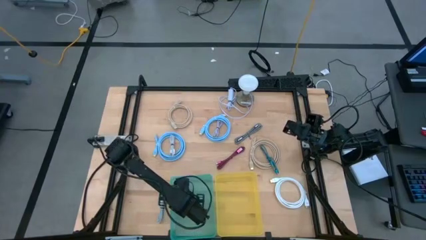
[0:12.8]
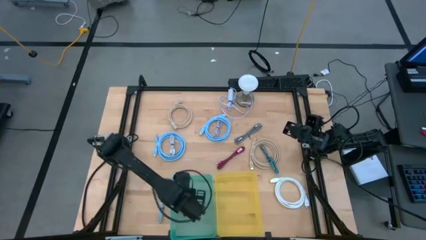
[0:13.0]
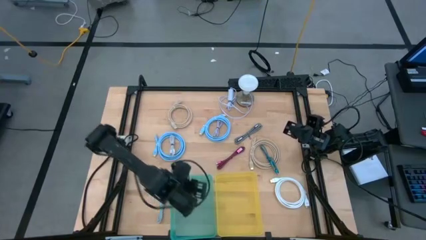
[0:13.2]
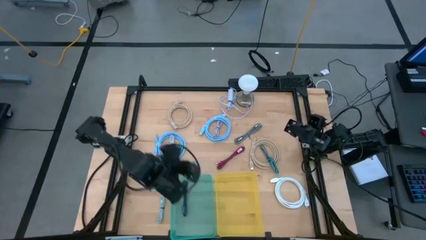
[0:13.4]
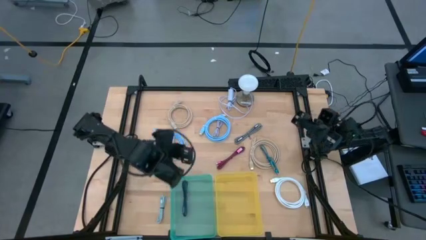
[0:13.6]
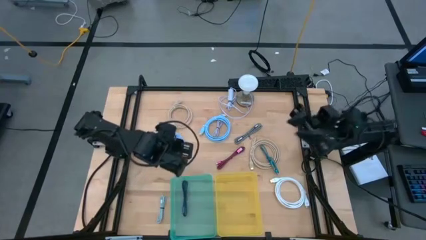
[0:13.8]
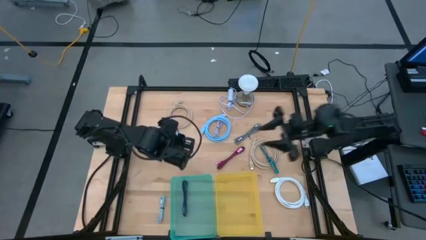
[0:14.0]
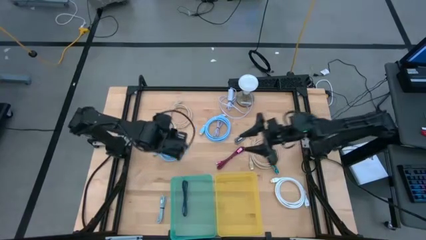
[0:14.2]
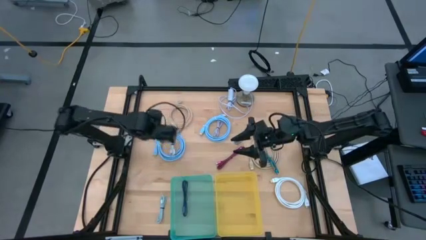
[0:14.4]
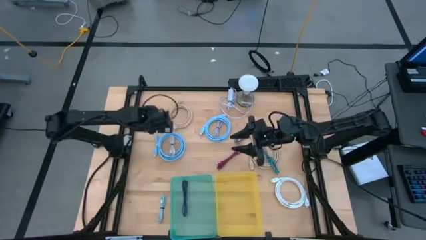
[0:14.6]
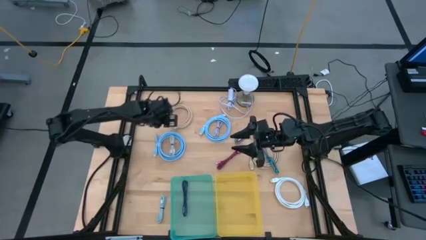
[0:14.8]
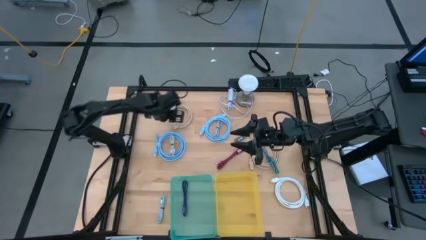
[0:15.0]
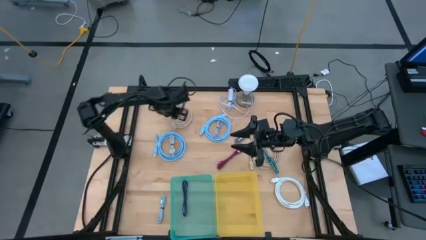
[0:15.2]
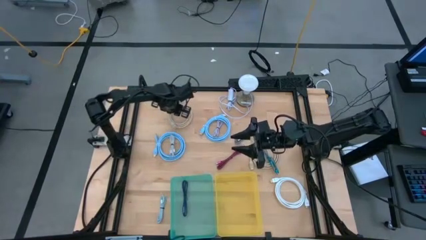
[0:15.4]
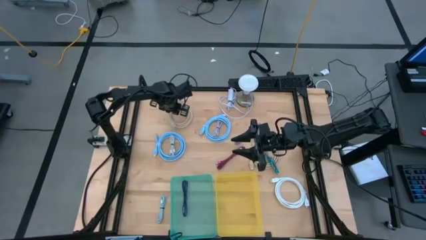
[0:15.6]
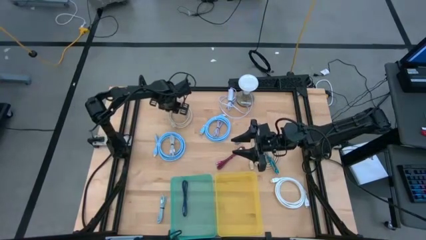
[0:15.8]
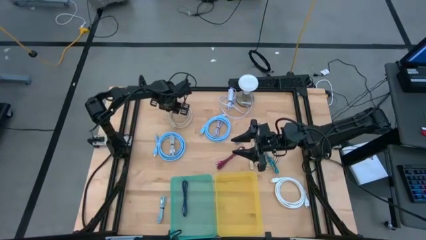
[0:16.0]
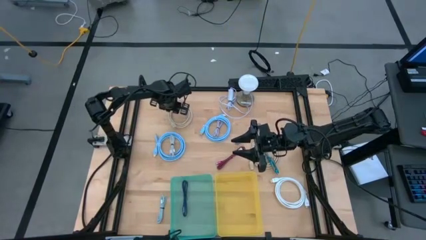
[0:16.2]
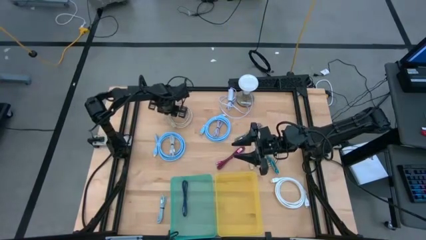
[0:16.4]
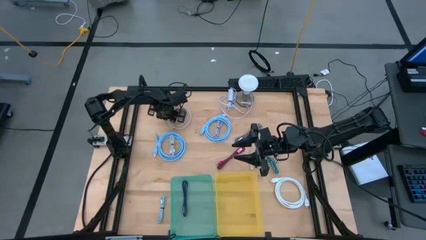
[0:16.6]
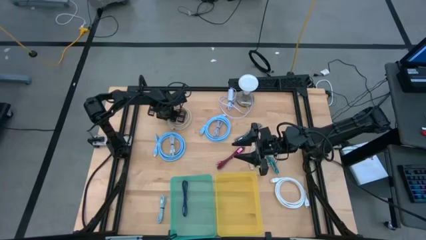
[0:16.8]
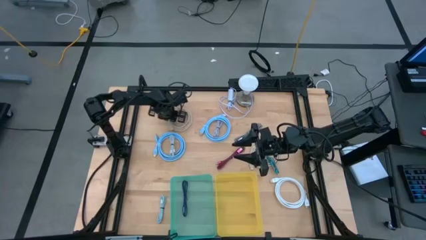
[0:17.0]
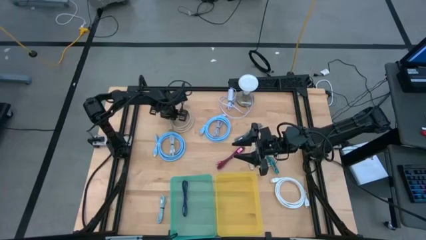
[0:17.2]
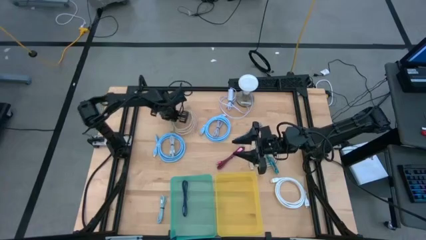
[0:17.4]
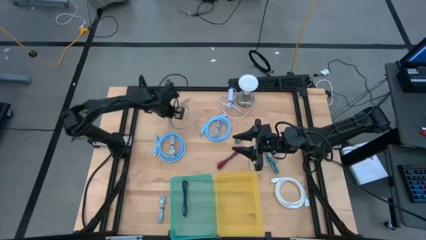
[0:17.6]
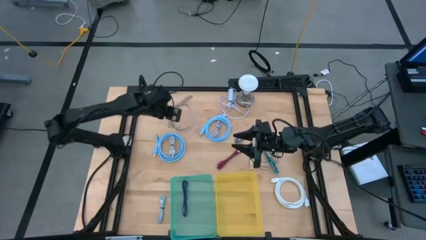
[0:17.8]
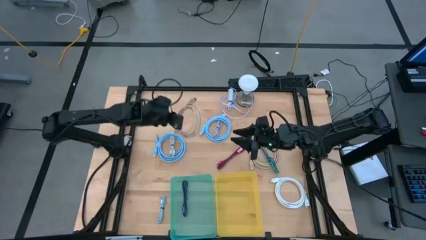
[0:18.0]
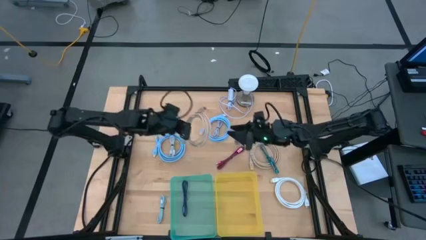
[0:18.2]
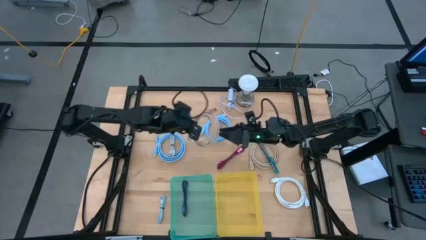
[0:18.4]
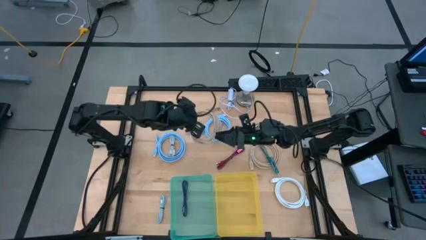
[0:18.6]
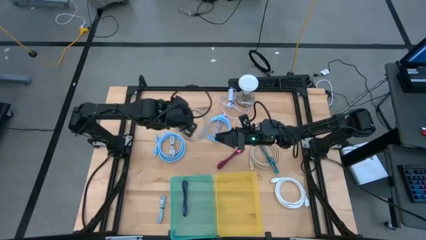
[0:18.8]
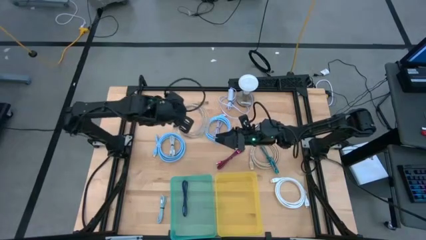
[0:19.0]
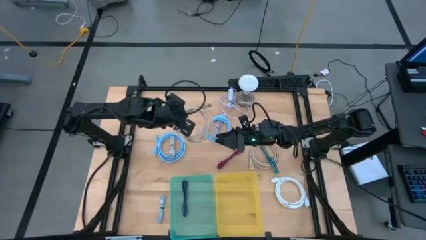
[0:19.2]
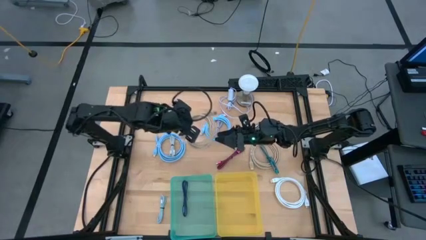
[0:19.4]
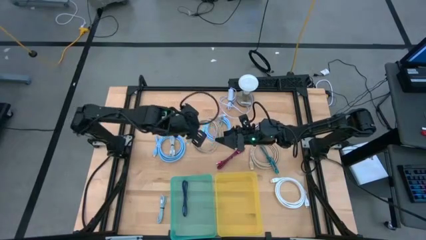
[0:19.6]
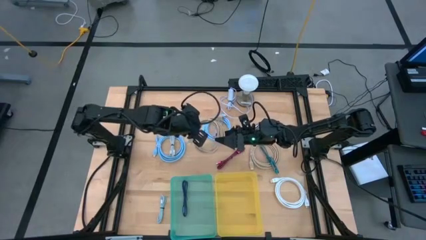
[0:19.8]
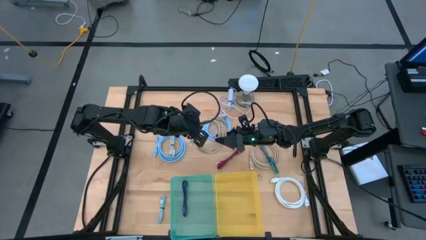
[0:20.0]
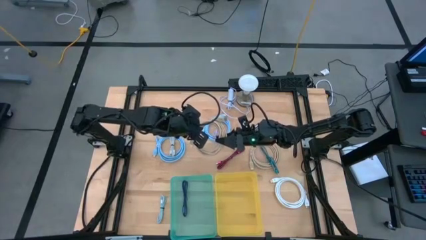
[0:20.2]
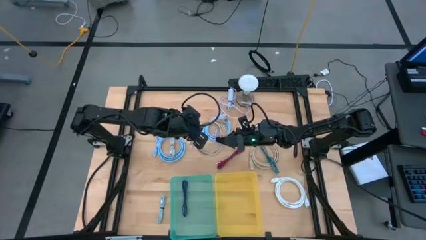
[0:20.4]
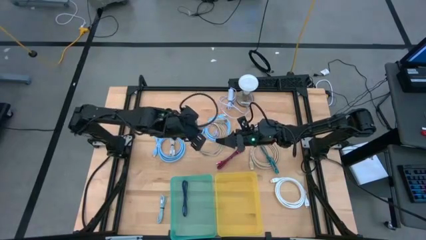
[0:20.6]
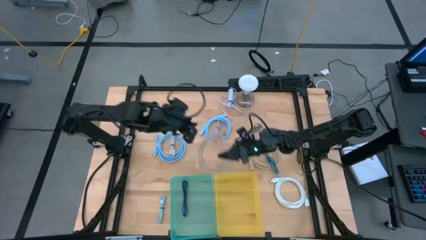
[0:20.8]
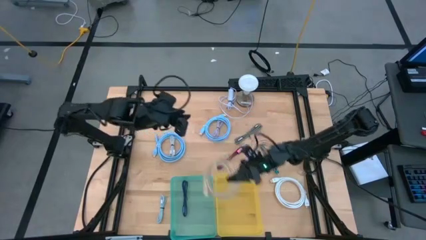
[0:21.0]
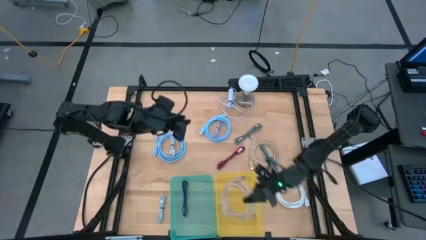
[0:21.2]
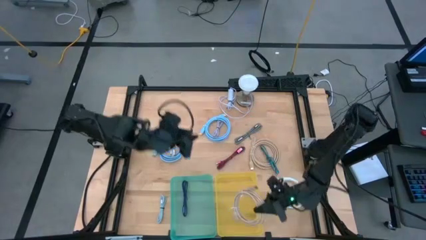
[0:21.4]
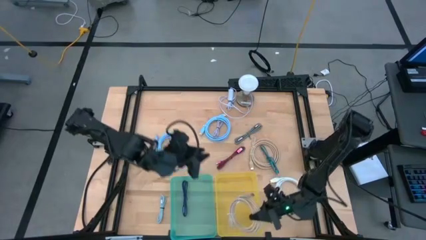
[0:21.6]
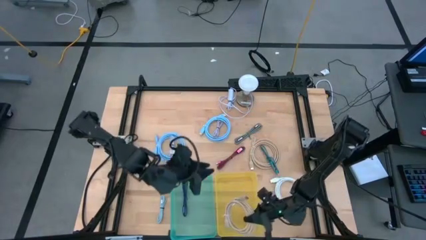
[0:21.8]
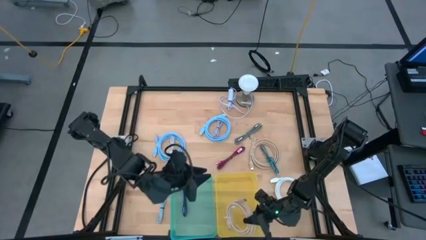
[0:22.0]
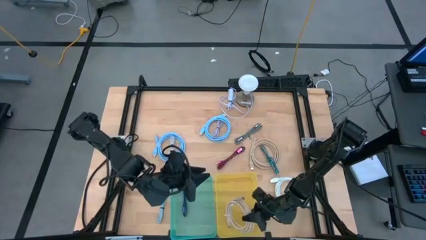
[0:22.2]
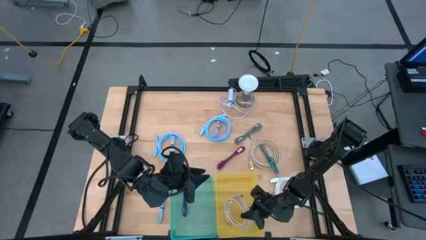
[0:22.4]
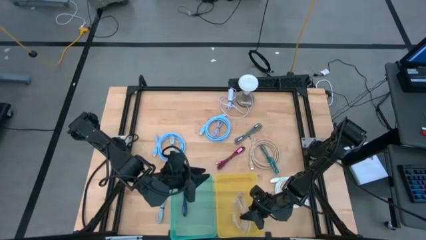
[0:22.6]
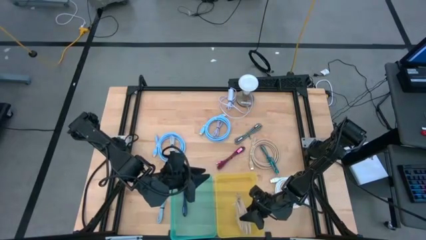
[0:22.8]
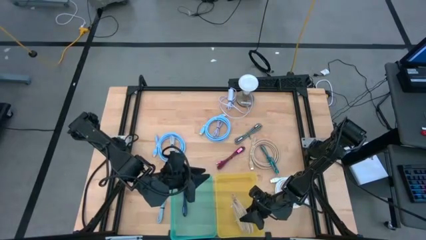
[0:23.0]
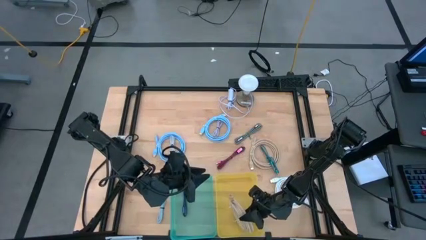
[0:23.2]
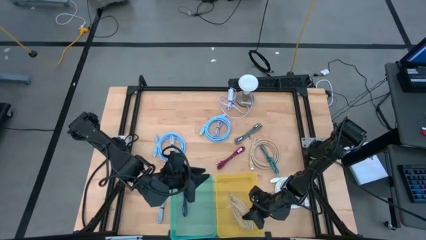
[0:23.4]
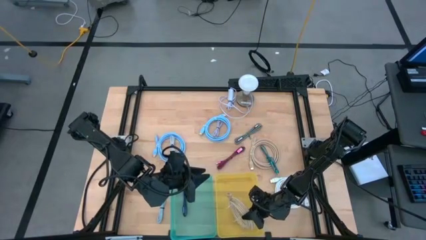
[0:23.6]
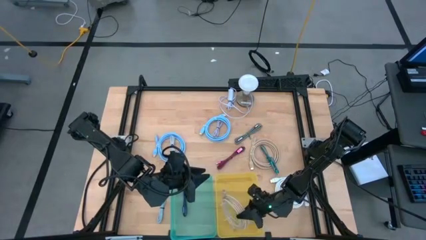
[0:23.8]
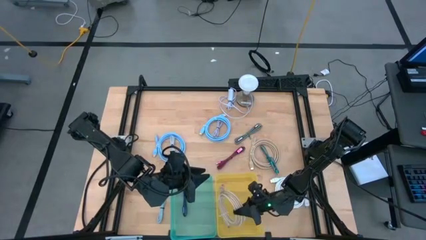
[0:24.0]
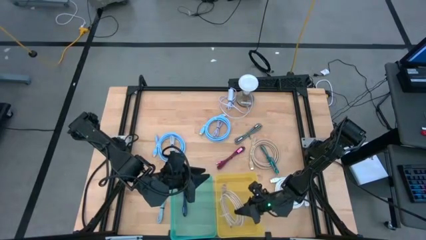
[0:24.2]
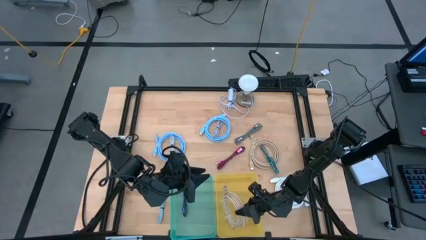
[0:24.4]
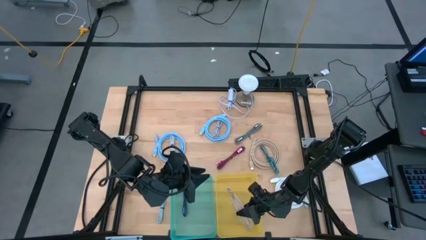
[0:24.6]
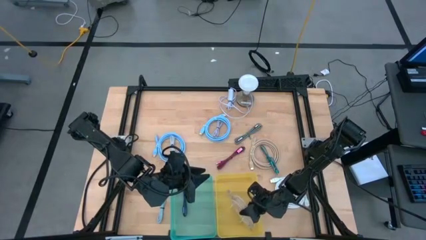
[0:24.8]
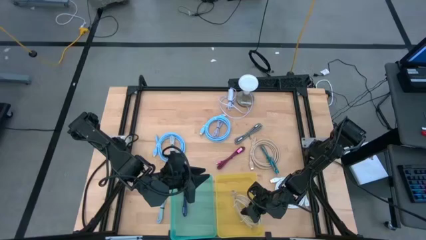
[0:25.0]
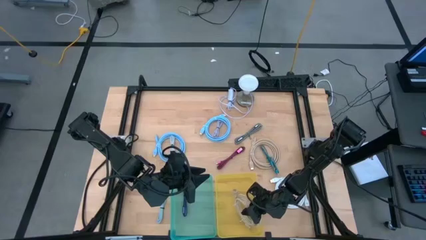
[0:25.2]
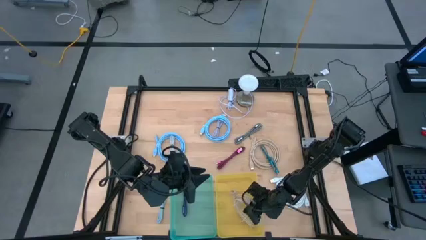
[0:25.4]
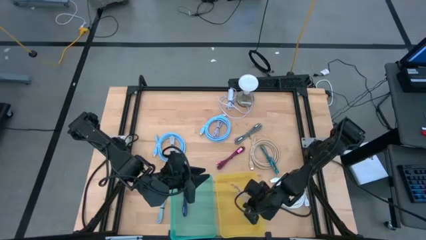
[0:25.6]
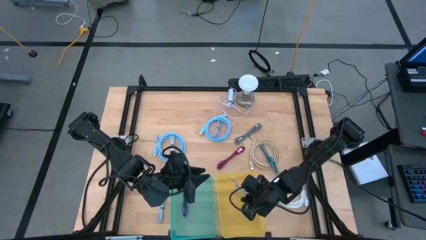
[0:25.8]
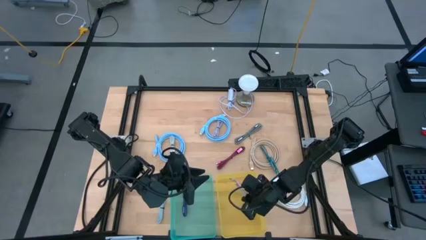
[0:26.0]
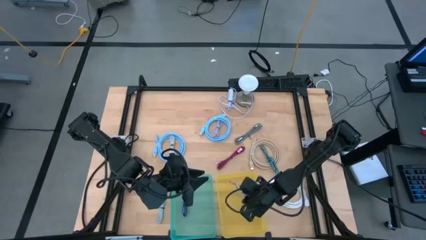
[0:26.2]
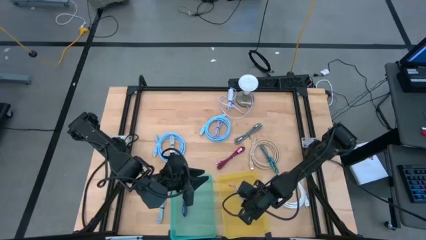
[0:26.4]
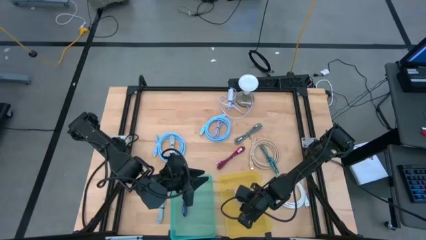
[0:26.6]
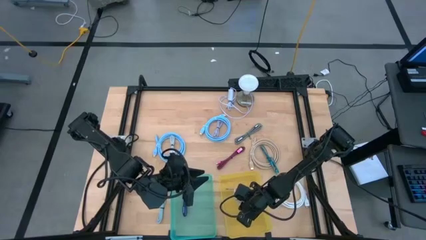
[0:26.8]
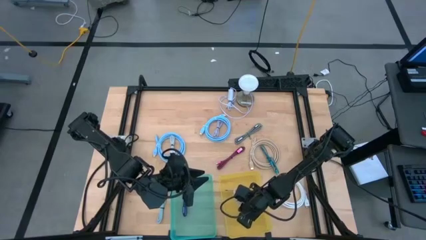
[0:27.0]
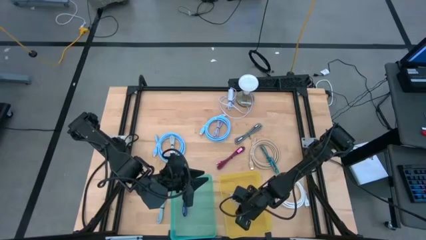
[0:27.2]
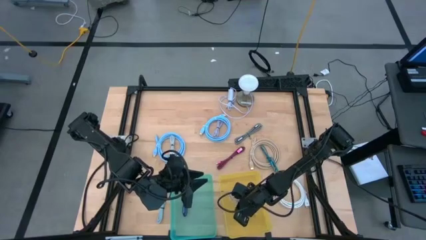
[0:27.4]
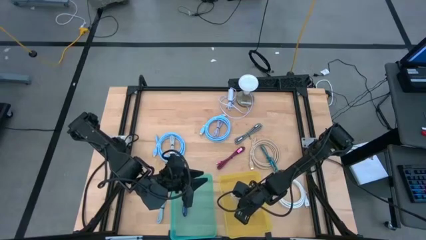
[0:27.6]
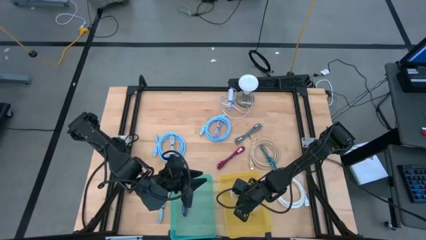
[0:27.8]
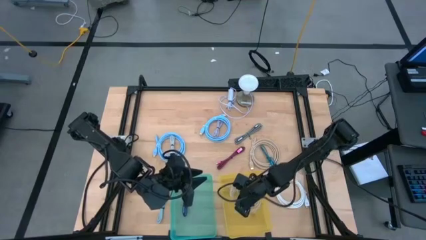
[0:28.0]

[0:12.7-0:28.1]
Task: Pick & Place USB Port
Put the left brown hdmi cable into the yellow bin
